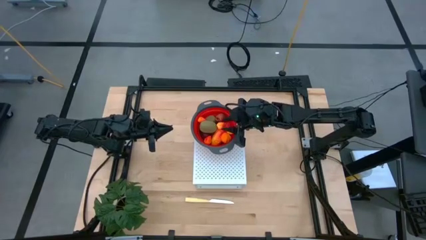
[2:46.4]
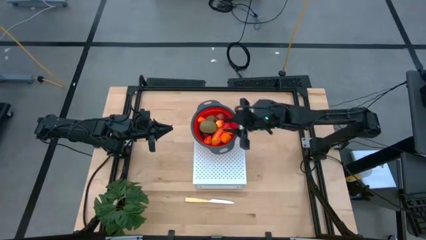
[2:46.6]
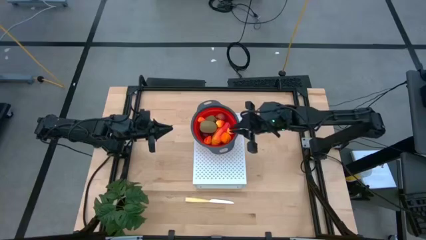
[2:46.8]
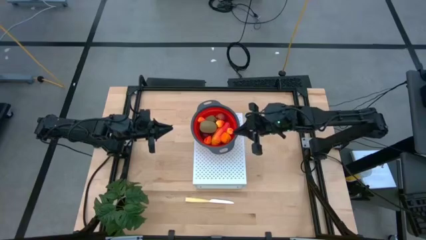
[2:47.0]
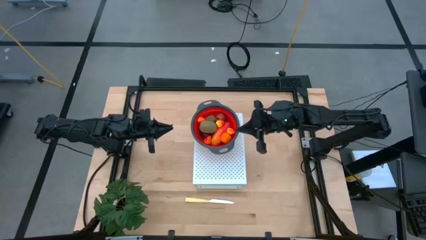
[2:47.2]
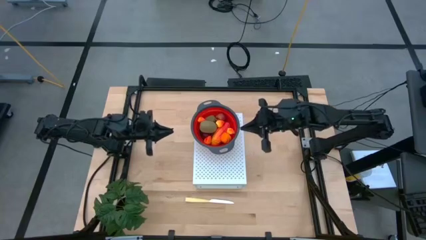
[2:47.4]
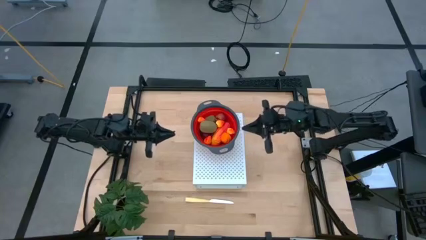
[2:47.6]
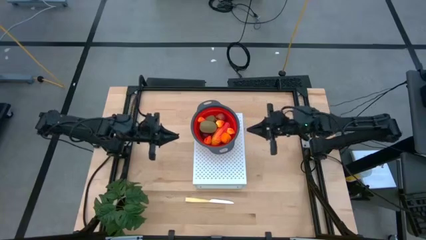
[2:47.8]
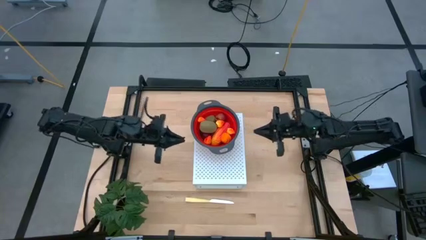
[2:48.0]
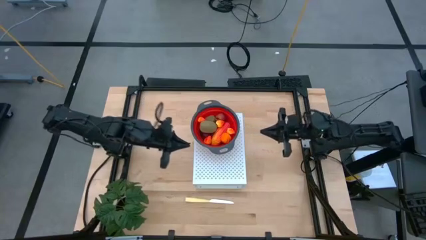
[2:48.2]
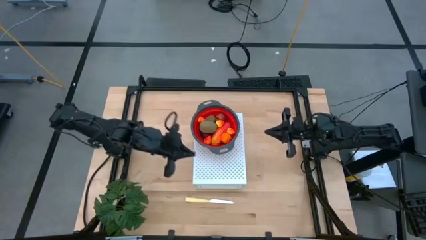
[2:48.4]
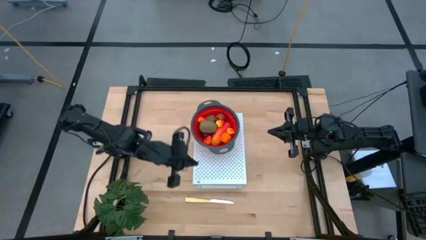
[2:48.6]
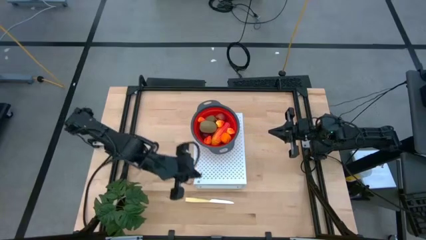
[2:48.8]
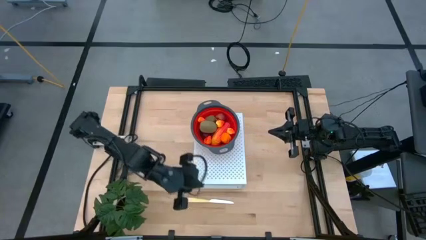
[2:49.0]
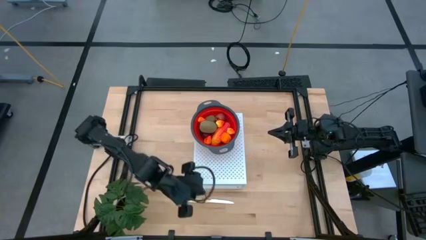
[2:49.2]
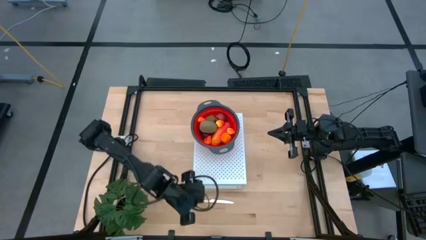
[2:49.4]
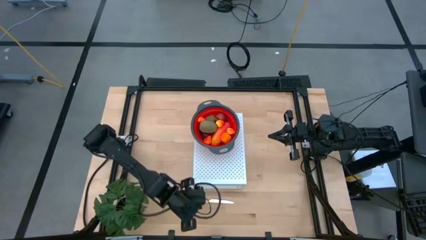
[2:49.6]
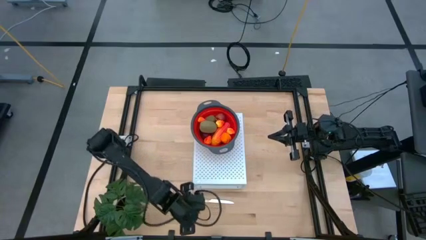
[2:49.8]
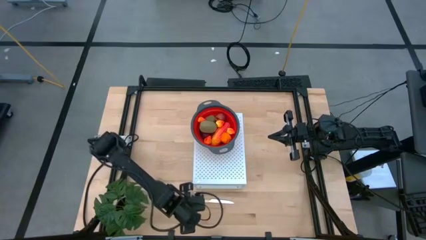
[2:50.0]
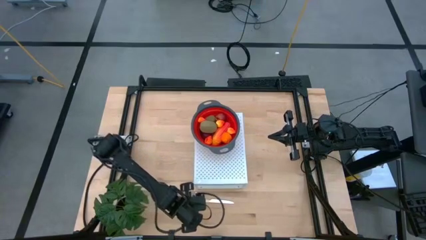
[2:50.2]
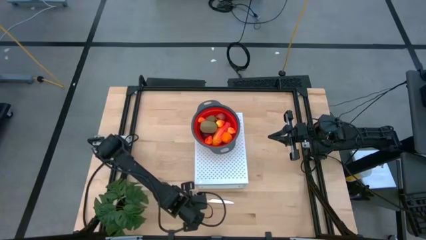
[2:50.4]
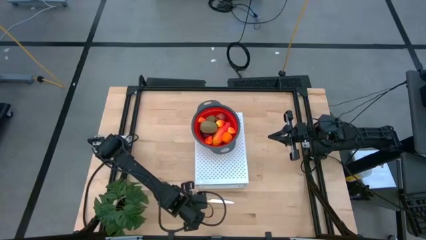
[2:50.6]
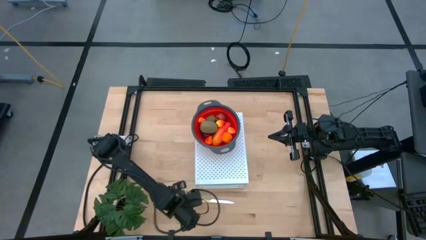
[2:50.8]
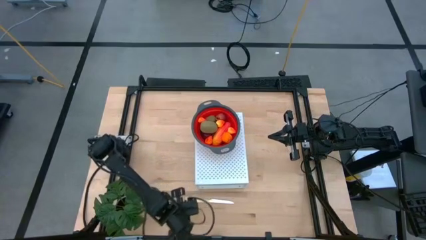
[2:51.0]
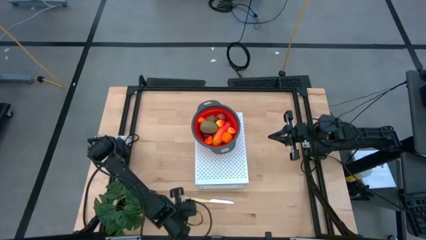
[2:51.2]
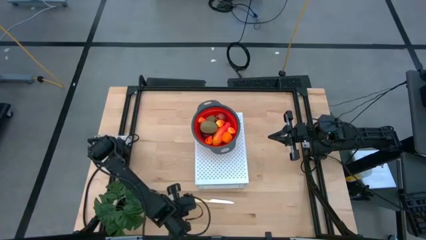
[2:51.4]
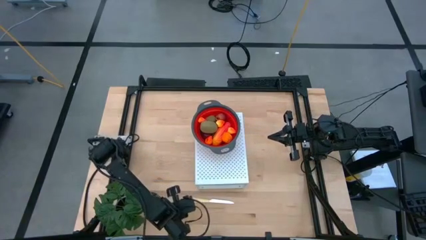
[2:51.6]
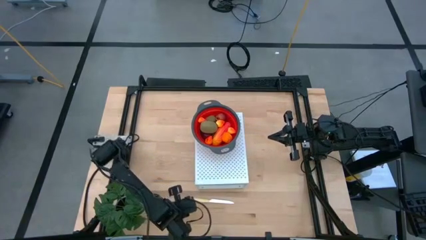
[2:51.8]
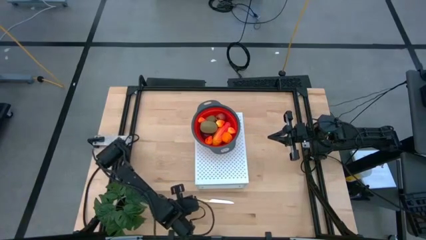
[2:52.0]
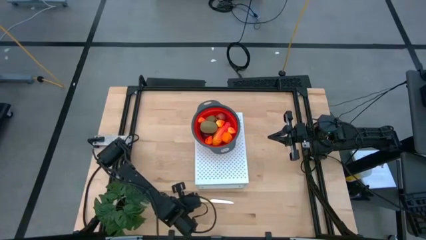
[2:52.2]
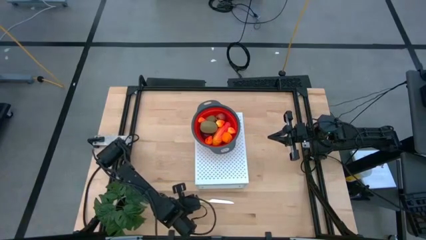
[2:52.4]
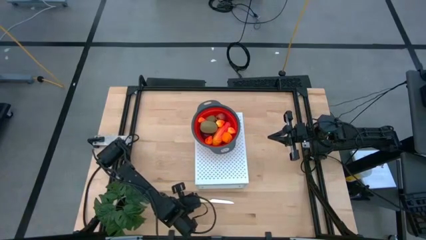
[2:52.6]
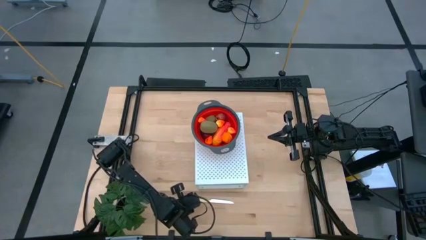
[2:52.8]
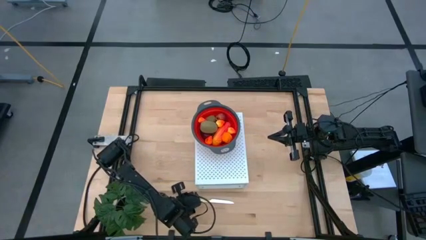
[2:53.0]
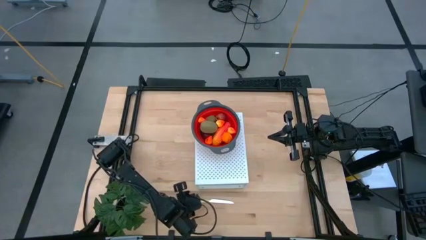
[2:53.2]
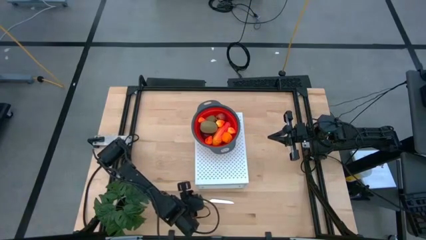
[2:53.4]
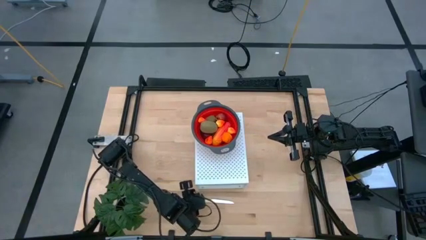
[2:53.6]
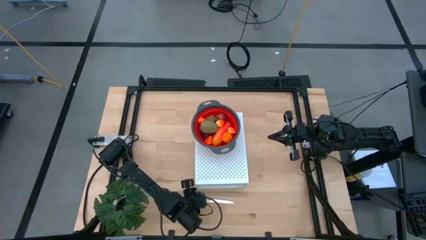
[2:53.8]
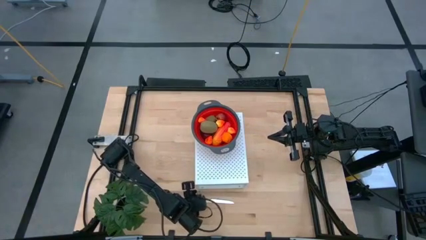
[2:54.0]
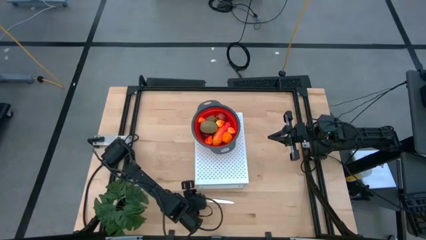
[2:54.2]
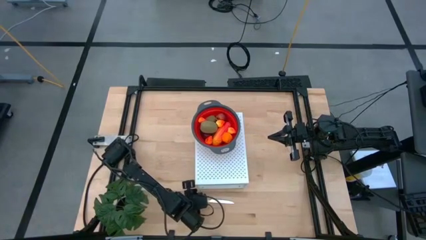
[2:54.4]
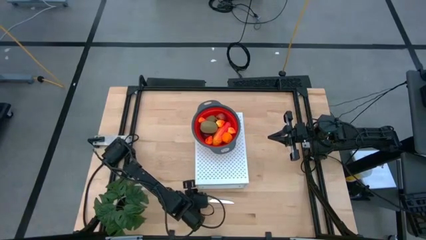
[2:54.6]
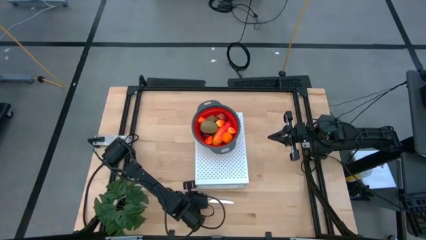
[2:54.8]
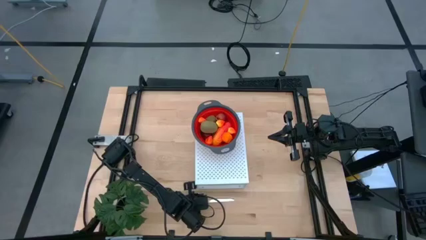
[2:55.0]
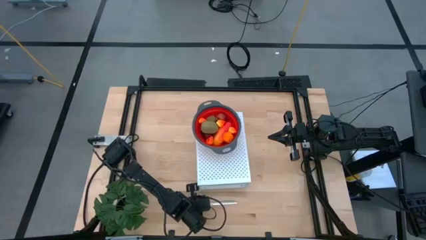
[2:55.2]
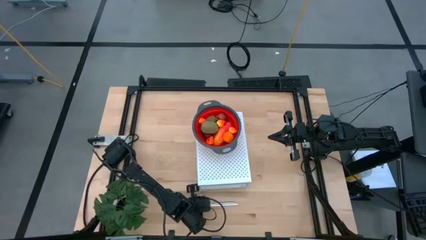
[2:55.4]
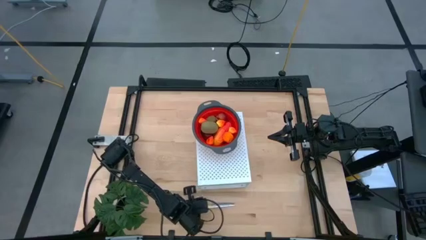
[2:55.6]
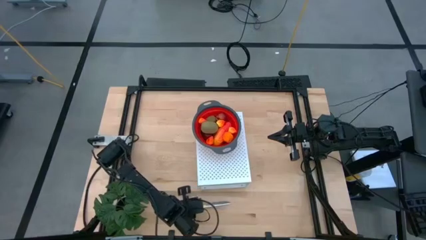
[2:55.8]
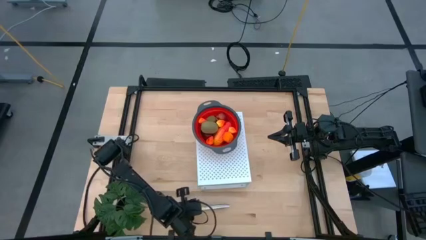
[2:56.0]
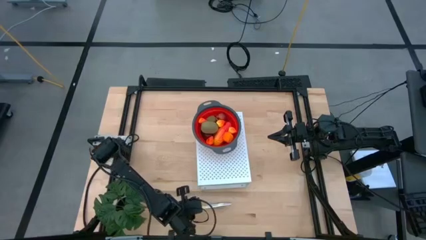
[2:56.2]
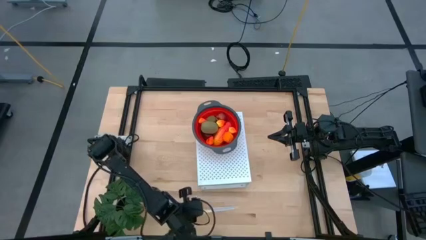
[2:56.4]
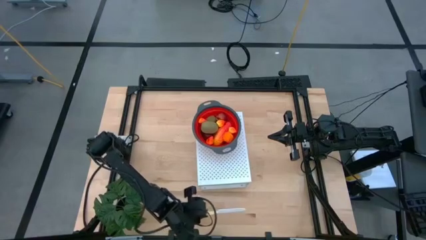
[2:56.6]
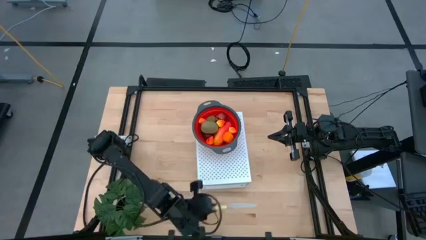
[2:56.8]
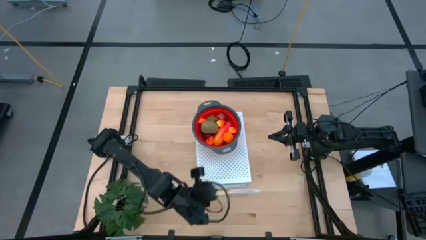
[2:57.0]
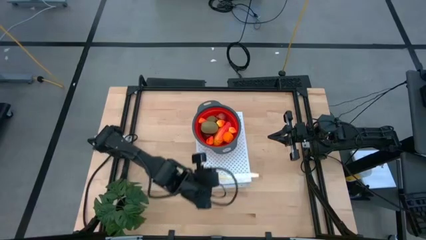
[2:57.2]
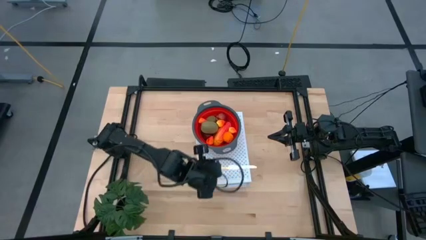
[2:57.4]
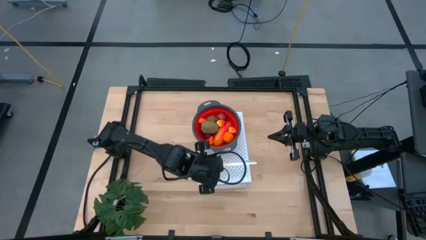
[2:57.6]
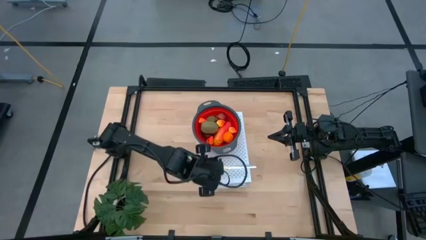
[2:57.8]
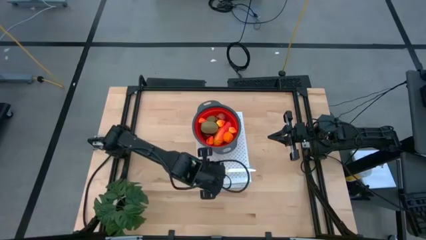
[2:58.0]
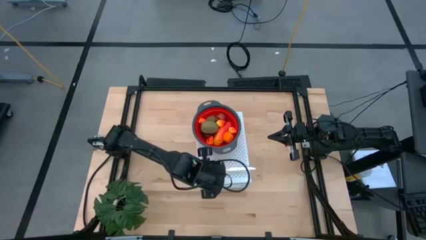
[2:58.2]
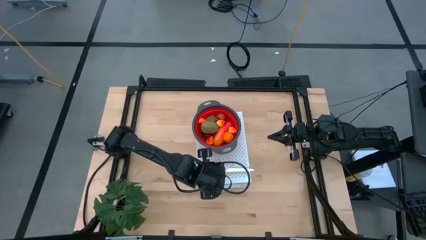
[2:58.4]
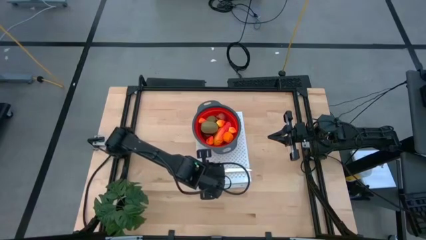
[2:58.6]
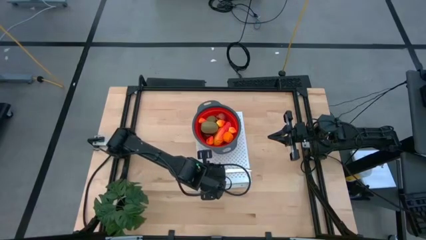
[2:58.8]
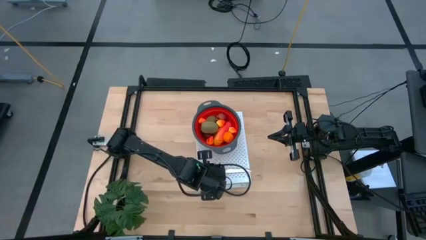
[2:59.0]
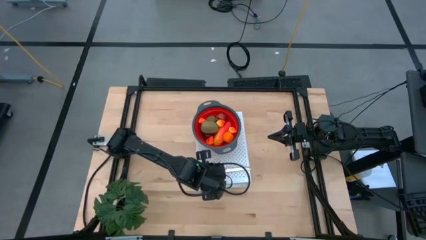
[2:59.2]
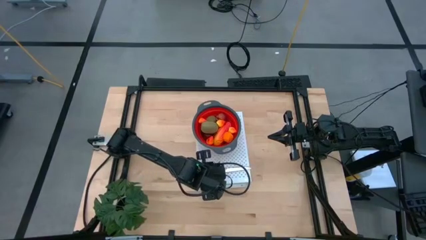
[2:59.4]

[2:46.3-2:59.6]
Task: Pick & Place Fruit
Put the yellow knife on the shelf

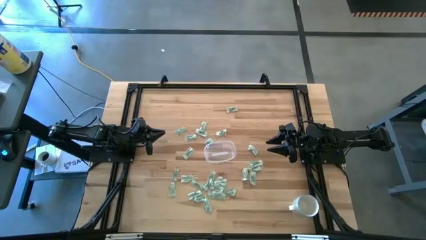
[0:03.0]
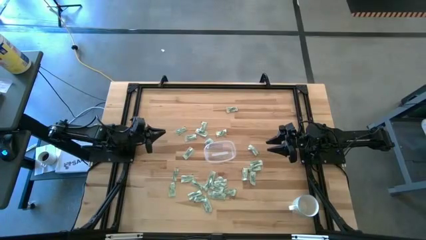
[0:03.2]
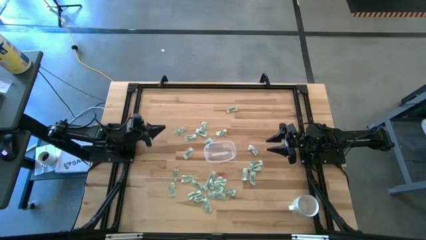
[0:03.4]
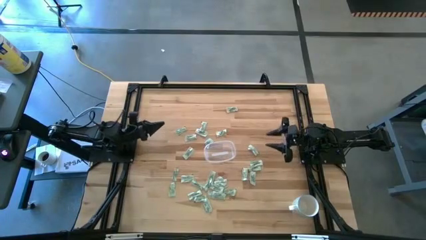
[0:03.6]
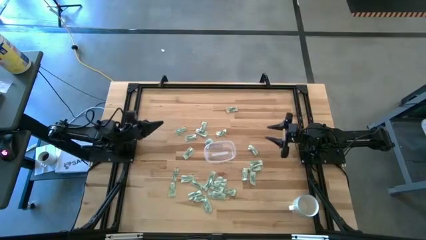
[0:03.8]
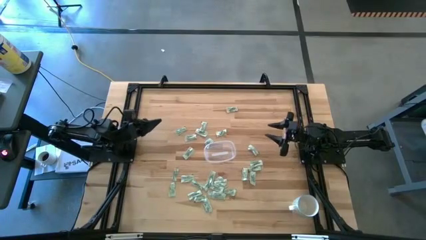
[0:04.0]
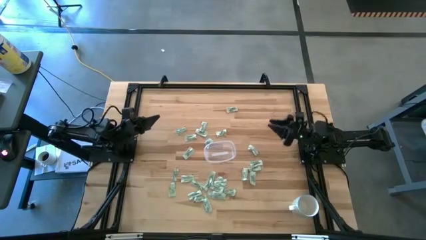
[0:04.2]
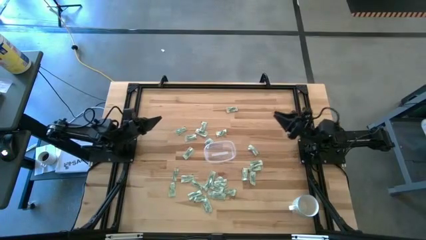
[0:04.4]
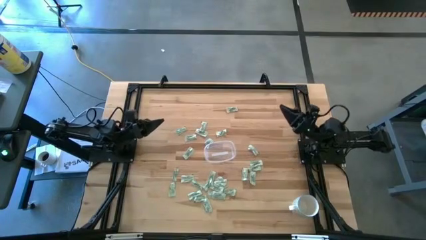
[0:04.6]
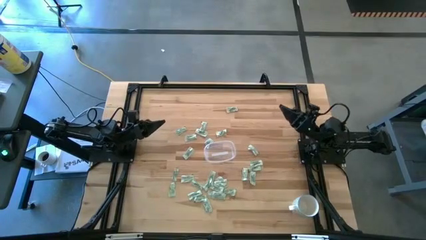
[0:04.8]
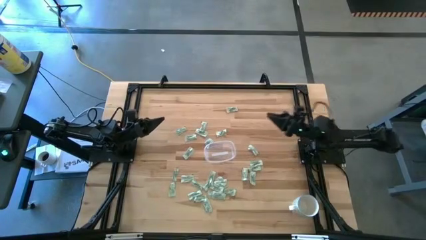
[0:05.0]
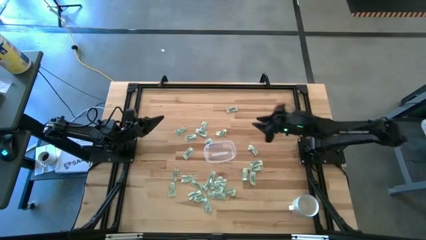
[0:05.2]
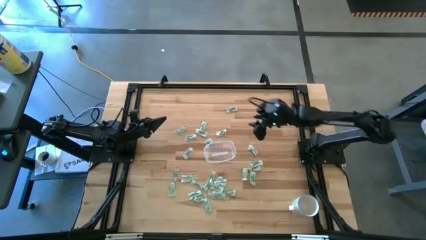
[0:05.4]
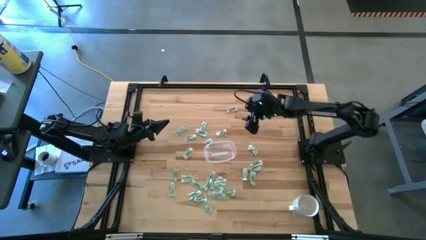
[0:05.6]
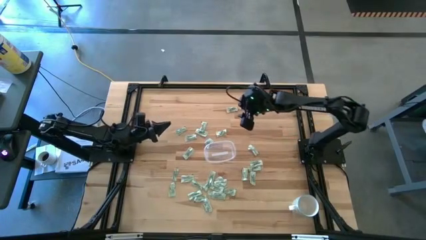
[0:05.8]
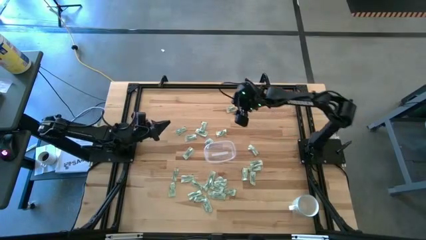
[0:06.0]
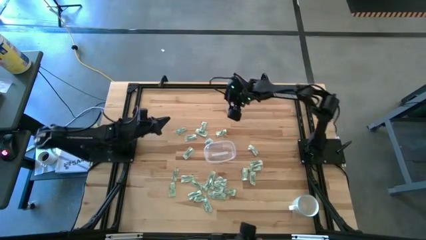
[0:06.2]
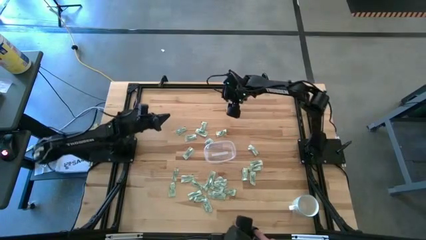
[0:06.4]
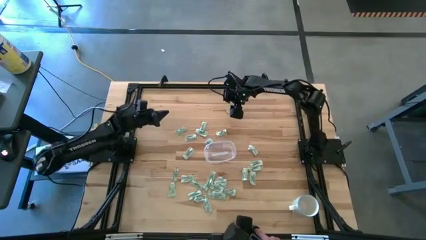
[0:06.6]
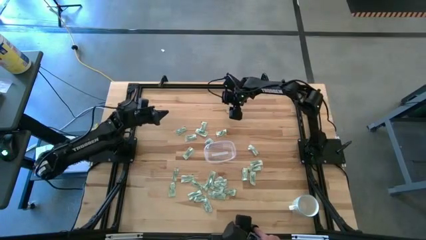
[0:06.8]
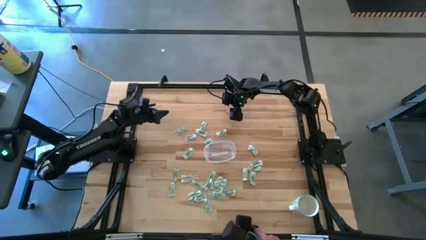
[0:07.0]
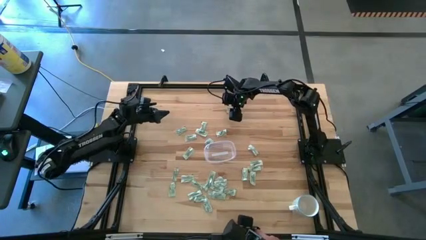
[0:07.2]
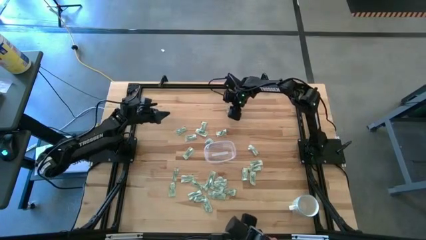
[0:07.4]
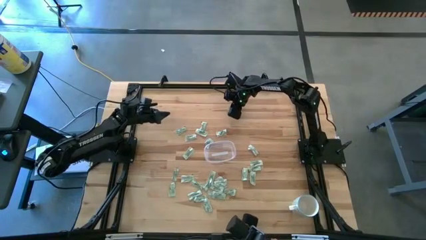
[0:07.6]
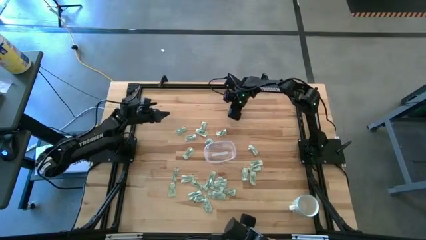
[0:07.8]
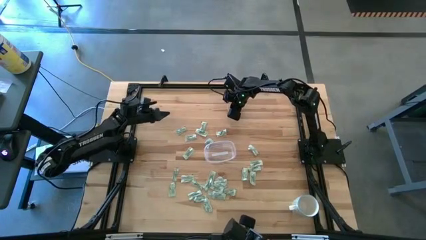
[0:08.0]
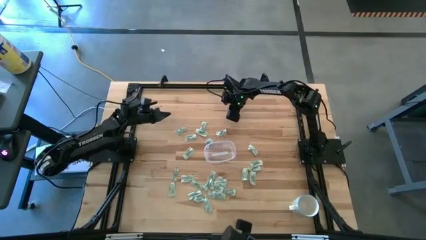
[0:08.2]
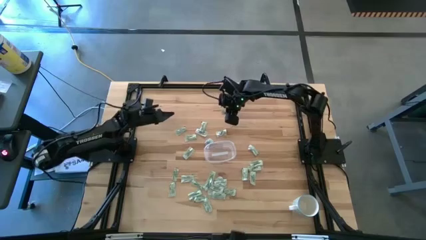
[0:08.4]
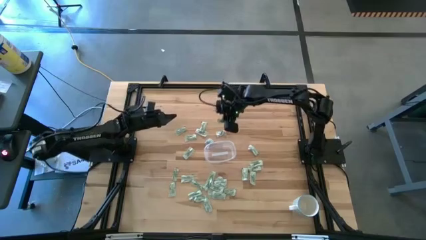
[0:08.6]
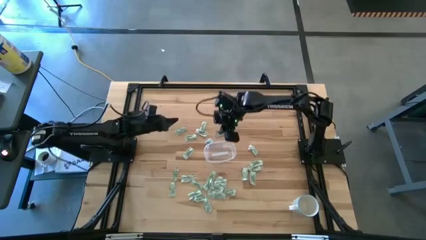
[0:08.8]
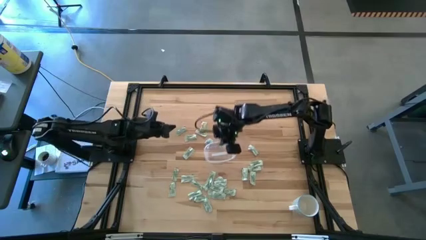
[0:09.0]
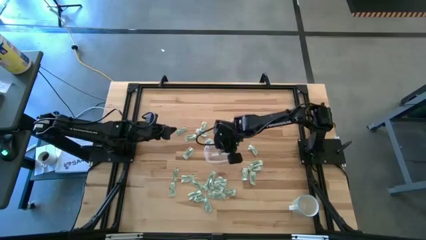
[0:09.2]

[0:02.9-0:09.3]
Task: Pick and place Stevia / Truvia into bins
Put the stevia packet into the transparent container
